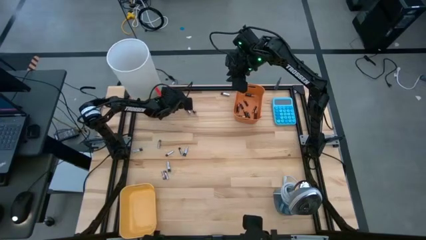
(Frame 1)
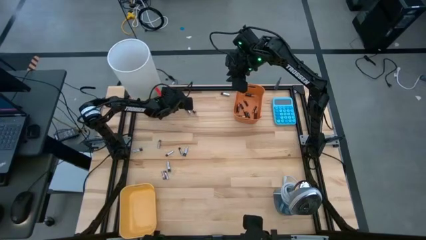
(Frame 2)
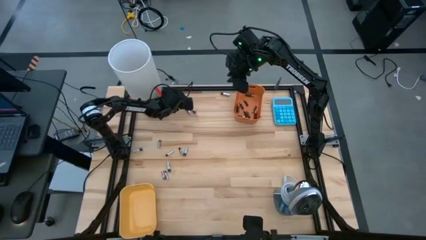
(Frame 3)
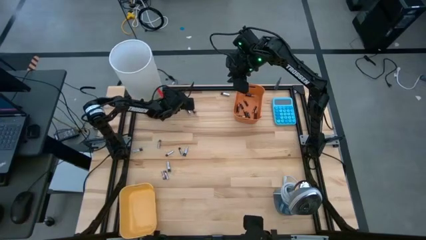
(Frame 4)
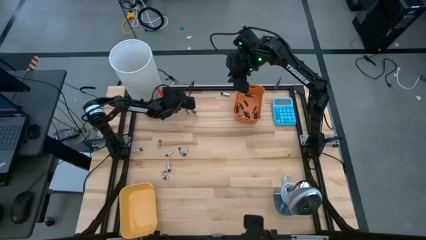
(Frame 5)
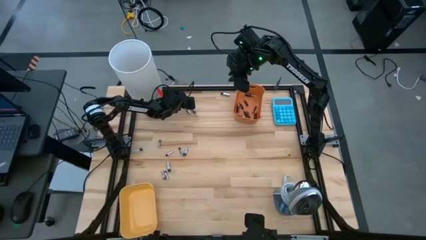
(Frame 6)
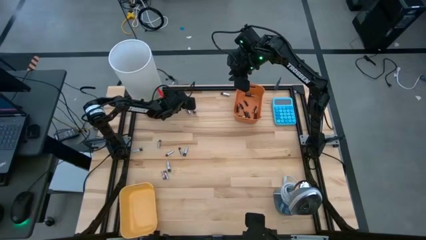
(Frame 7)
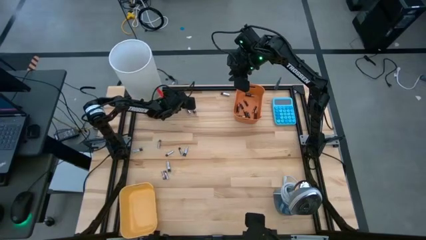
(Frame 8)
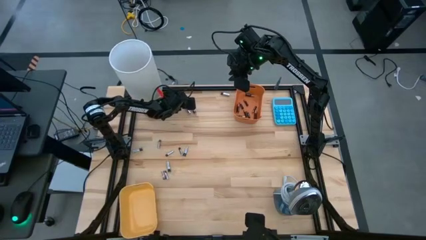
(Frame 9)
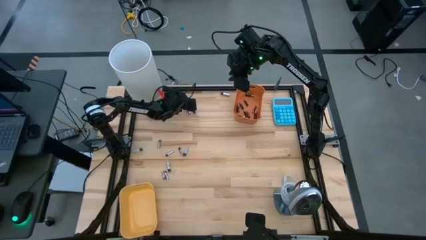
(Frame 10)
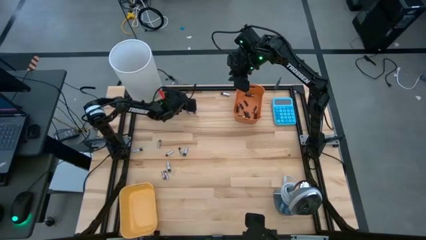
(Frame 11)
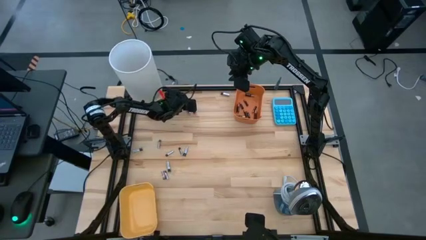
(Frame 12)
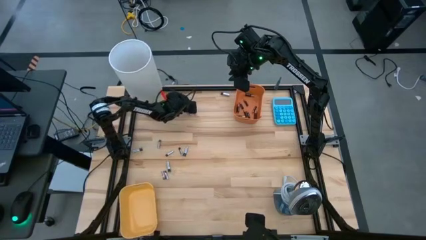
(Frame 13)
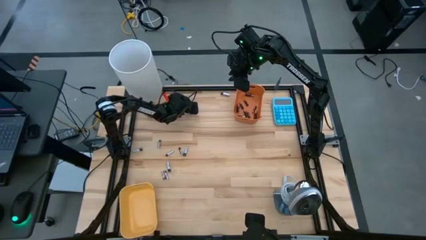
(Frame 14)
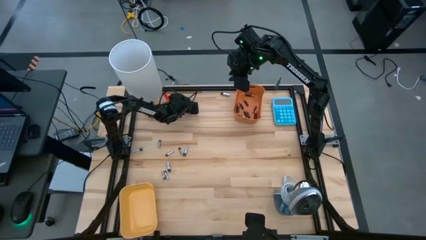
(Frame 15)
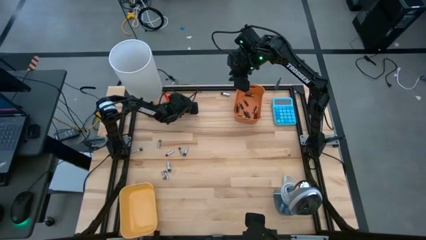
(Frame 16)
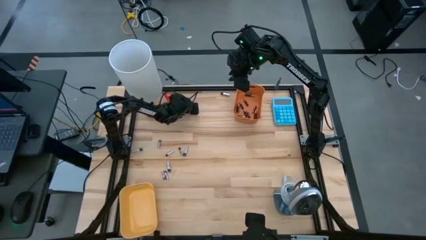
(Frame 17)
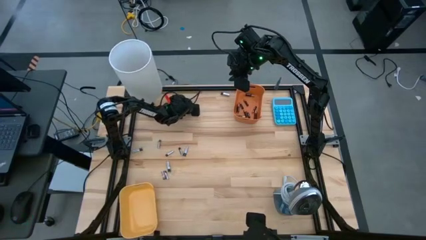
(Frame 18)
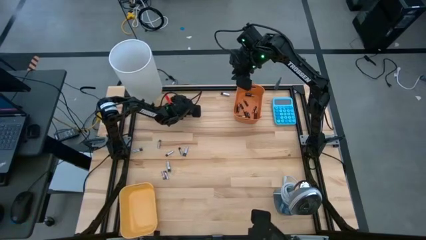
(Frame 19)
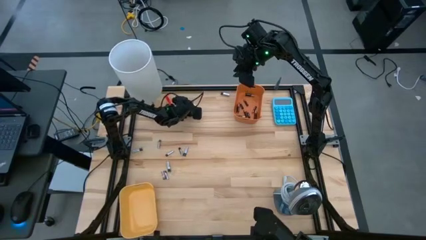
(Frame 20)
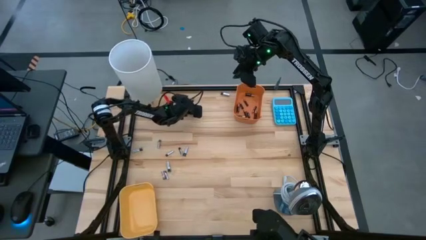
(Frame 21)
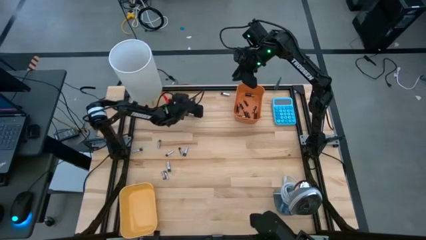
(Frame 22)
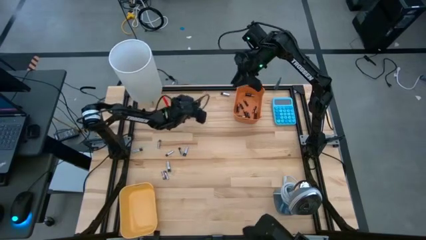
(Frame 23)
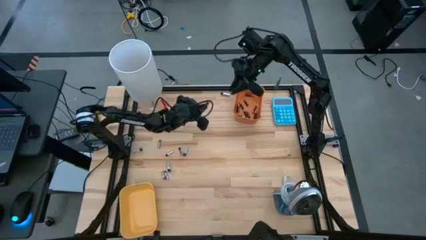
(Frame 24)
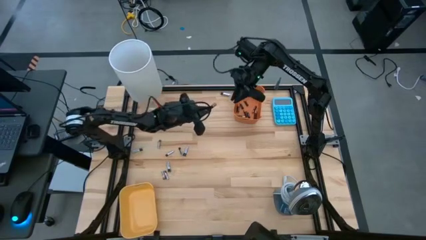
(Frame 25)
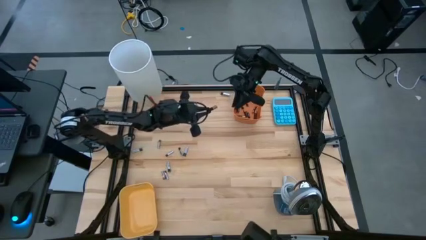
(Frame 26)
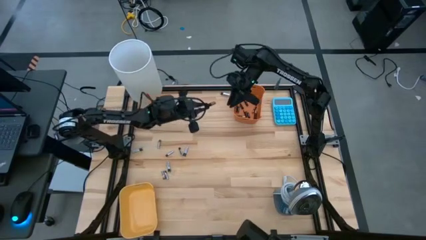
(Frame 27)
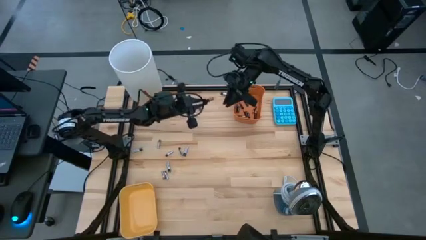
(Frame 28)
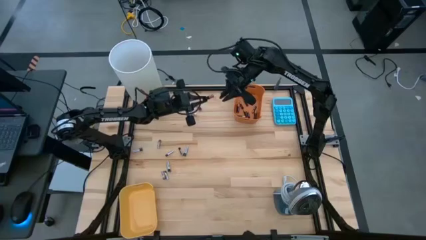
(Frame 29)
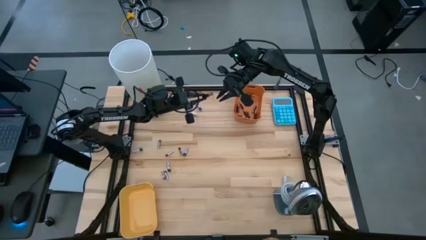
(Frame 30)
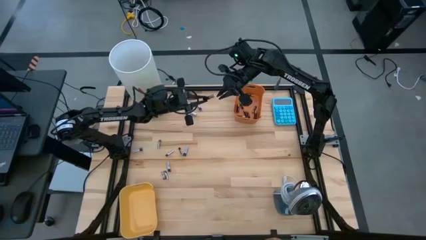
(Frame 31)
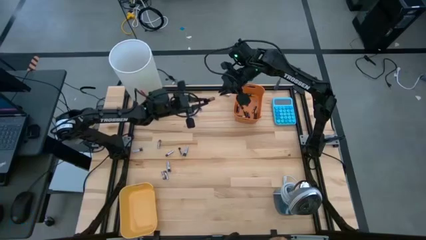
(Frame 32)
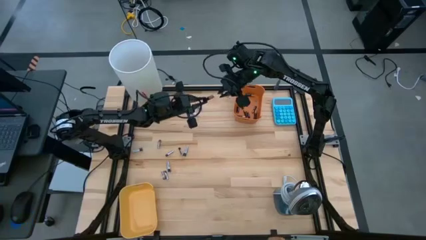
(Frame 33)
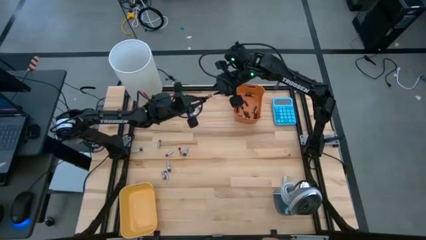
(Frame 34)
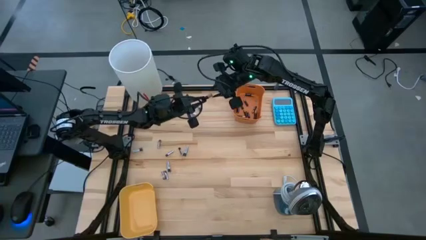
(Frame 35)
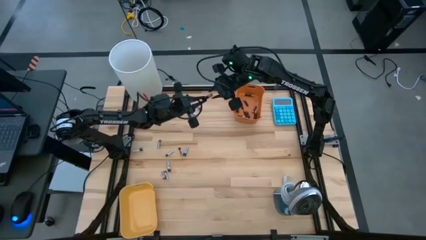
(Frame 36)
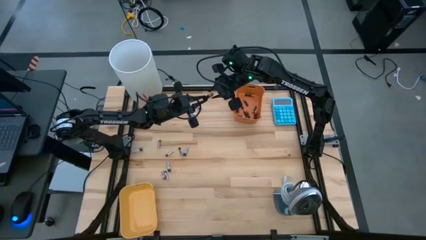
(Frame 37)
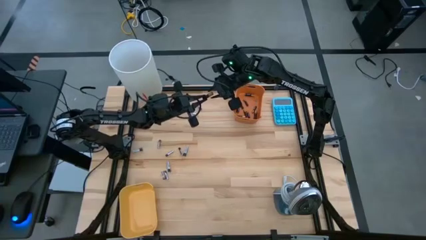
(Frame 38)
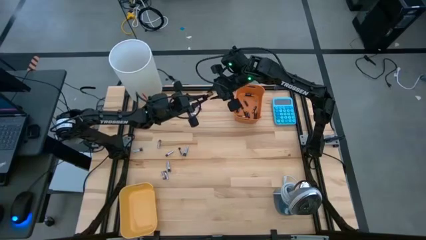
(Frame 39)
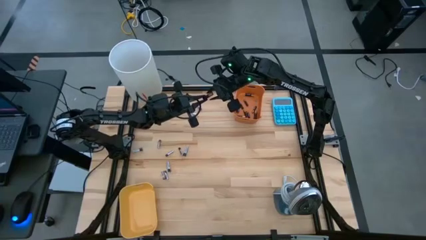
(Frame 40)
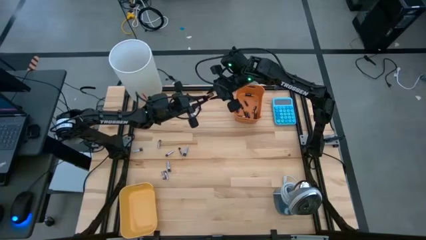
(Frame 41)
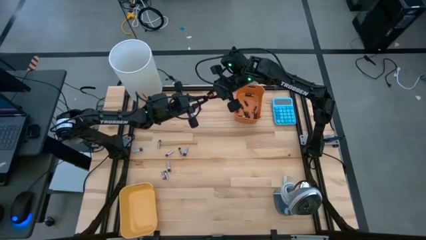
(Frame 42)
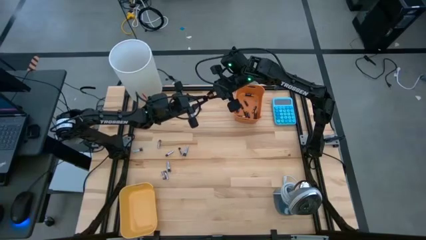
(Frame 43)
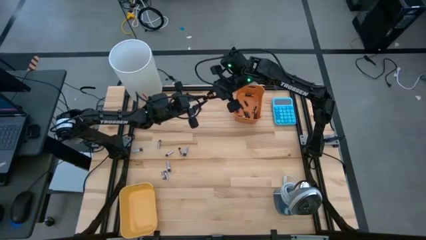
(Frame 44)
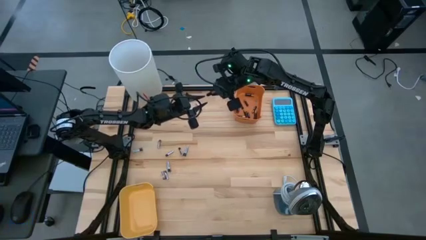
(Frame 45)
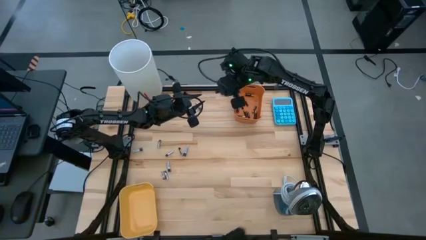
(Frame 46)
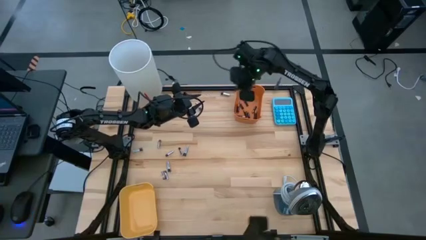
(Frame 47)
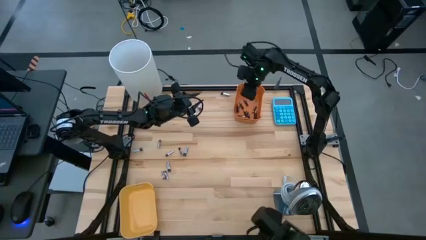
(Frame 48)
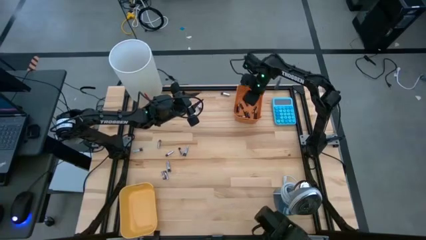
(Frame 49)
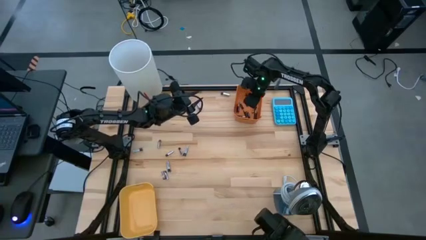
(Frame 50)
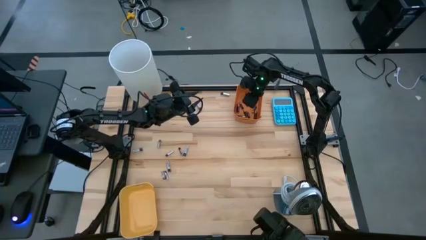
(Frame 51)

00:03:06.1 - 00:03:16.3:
Task: Sort batteries
Put the black battery into the orange bin
